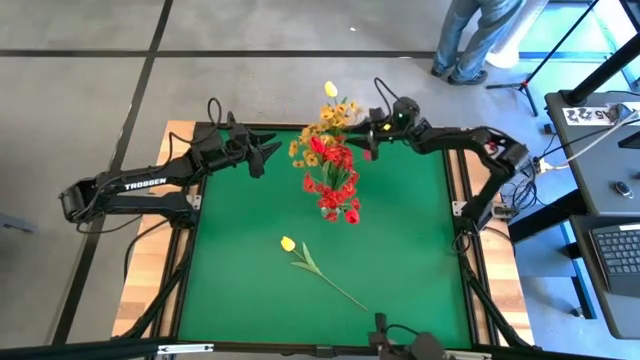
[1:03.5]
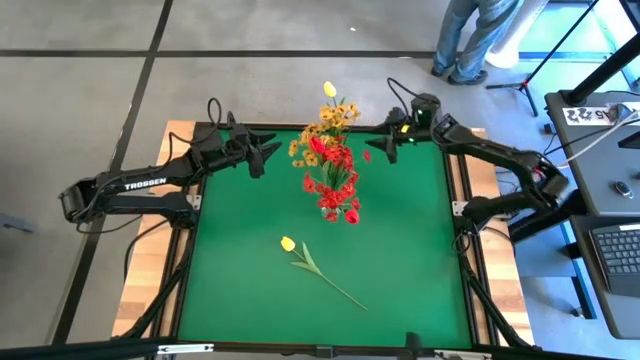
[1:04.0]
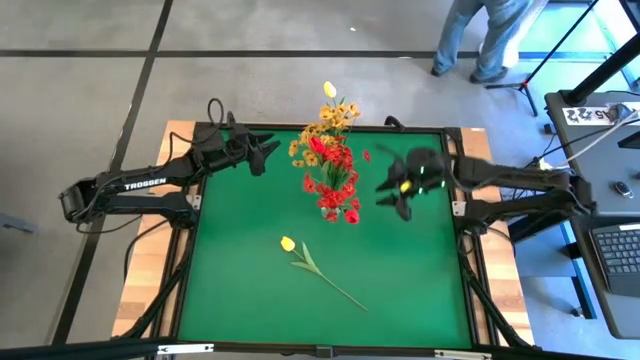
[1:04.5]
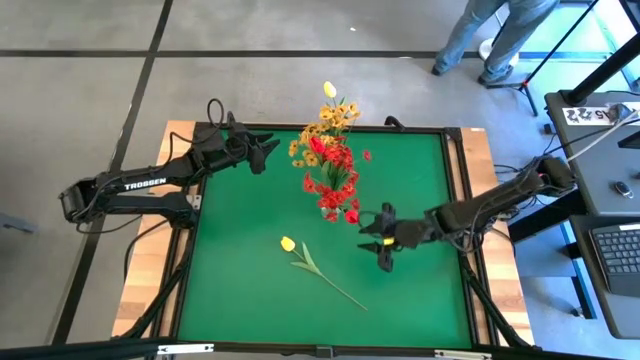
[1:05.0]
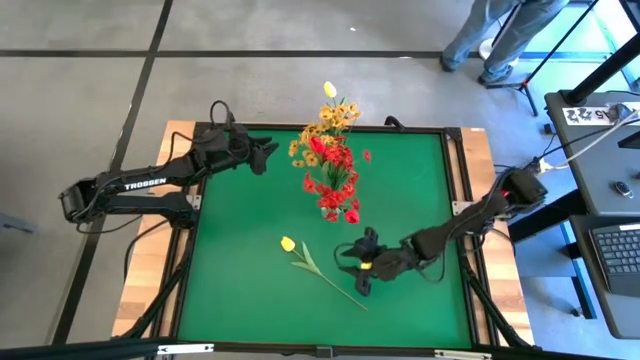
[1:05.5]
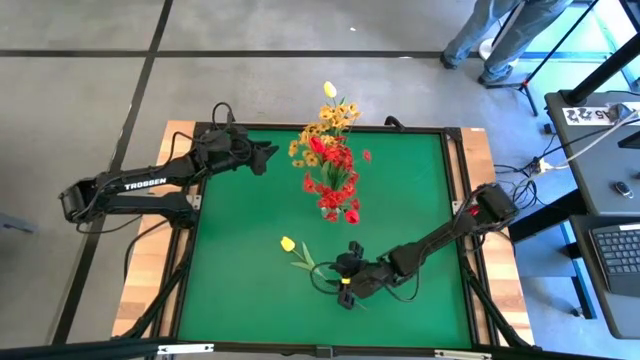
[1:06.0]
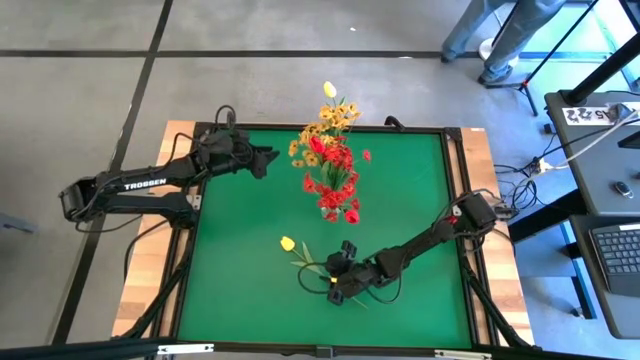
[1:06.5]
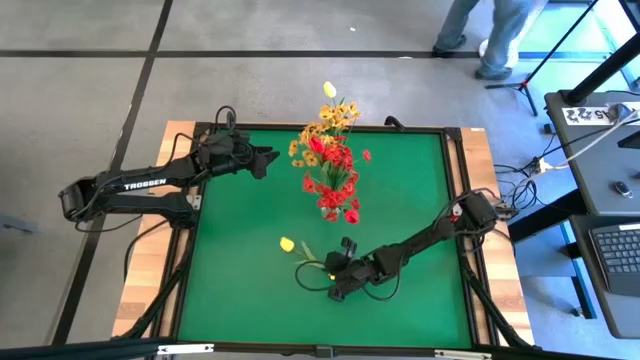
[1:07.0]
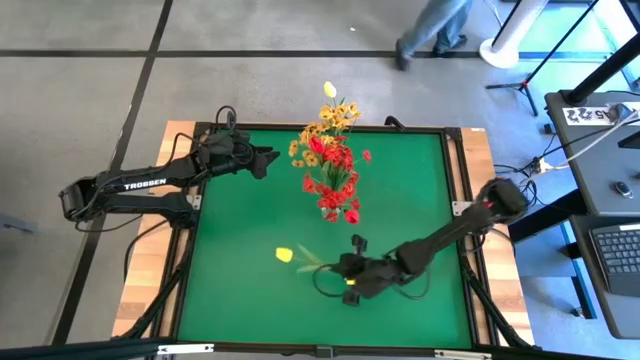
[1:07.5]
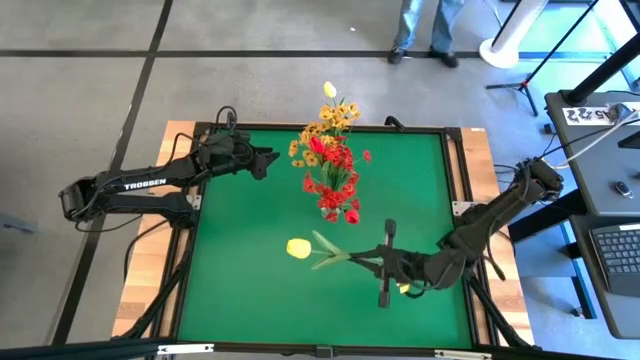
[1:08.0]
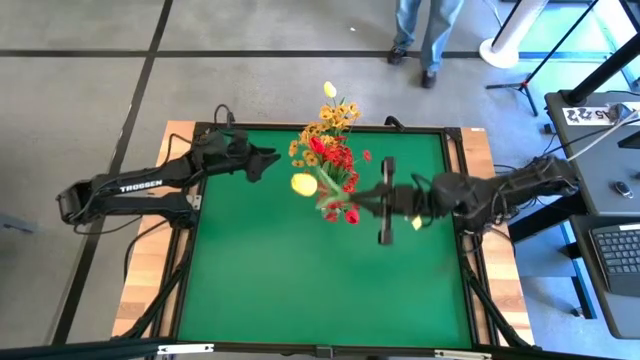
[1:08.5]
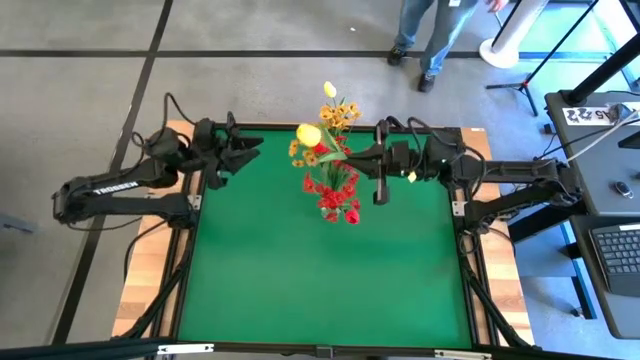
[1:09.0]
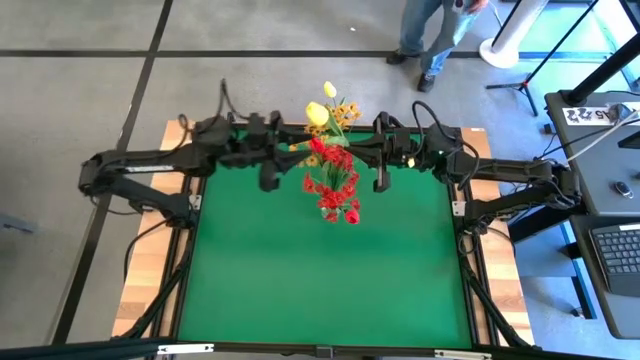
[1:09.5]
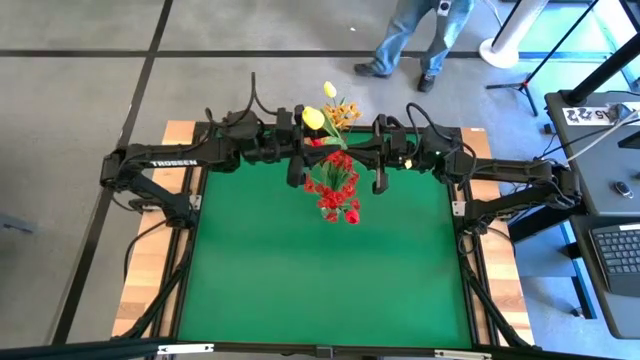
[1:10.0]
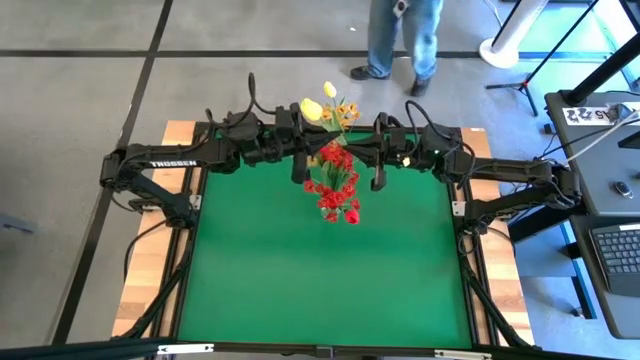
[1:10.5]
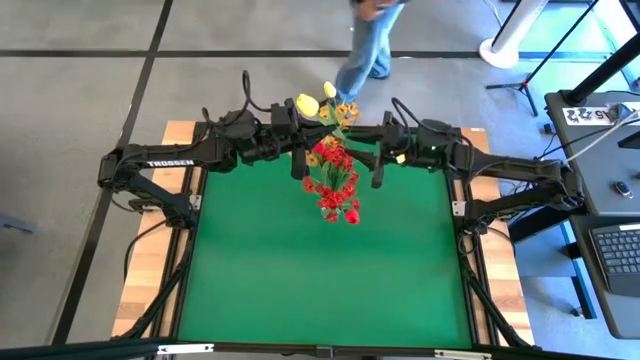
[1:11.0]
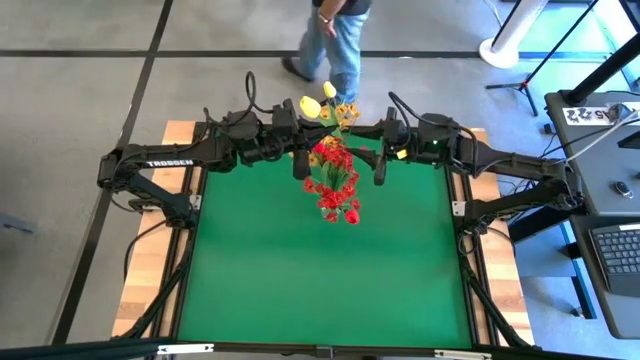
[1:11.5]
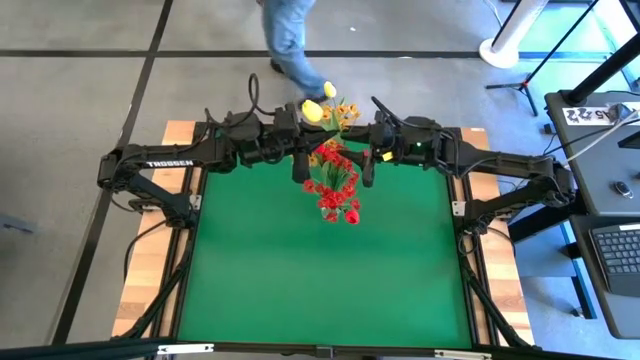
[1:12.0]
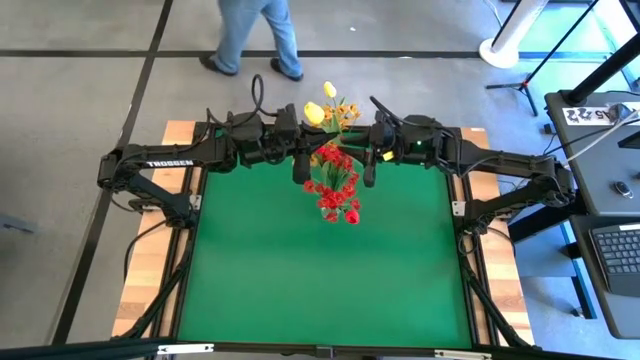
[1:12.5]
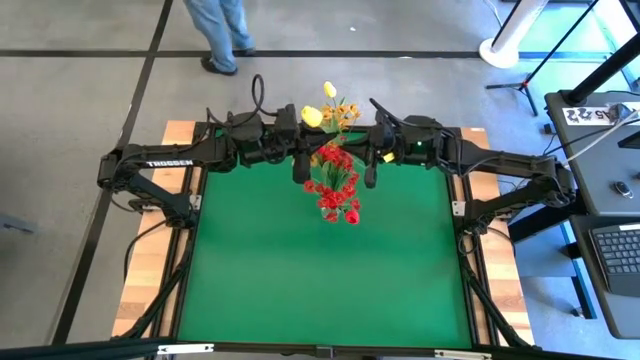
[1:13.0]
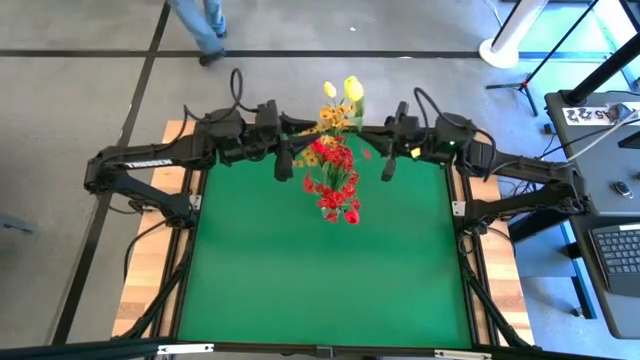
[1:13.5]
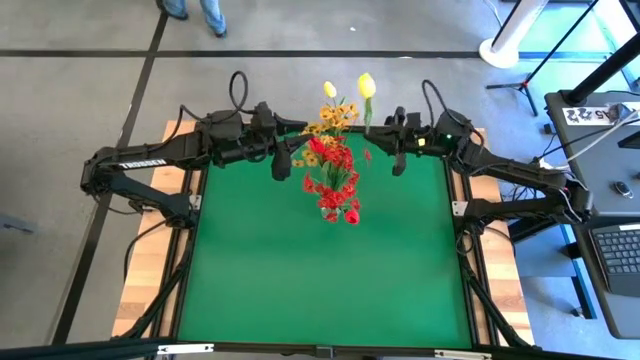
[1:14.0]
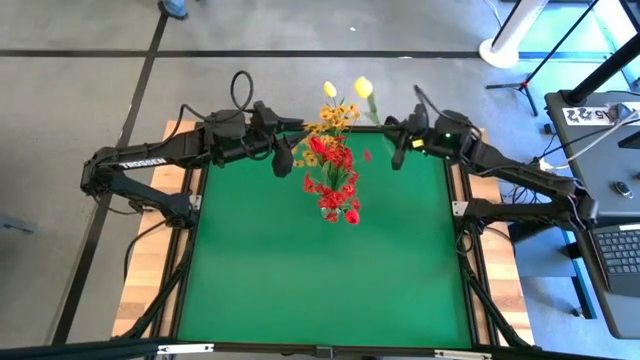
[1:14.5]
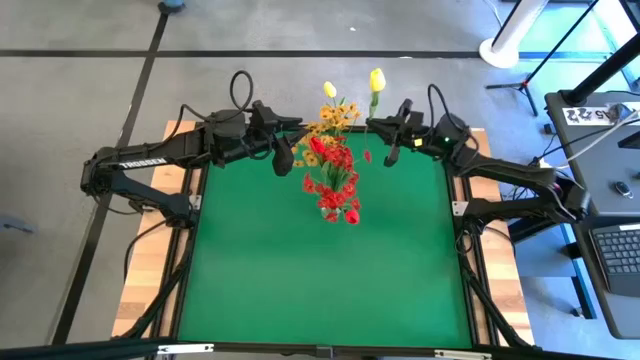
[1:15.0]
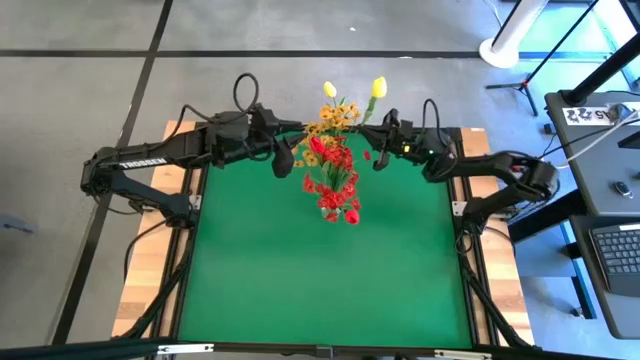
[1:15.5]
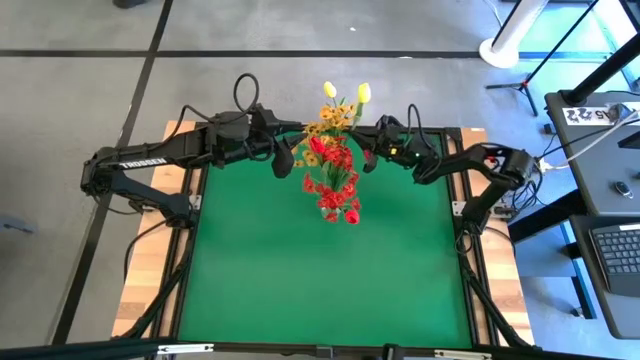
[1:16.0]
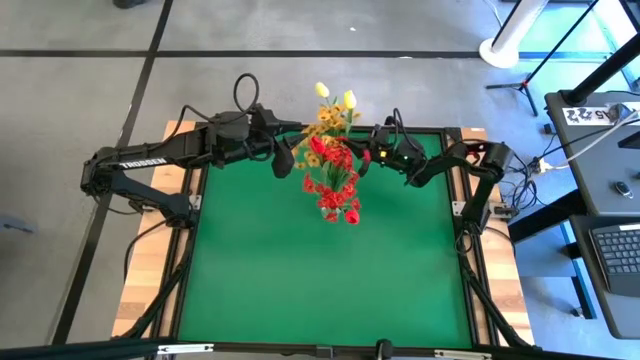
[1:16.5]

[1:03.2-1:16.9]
Task: Sort flowers into vase by color
Put the yellow flower into the red vase

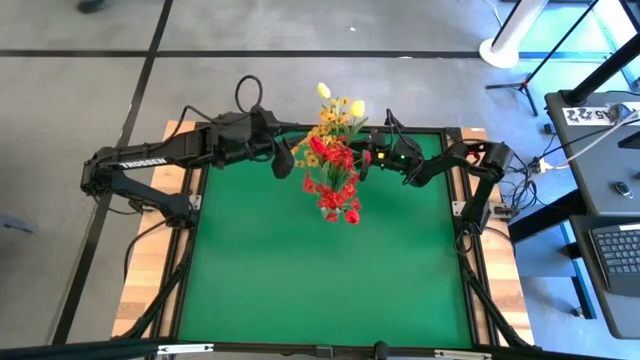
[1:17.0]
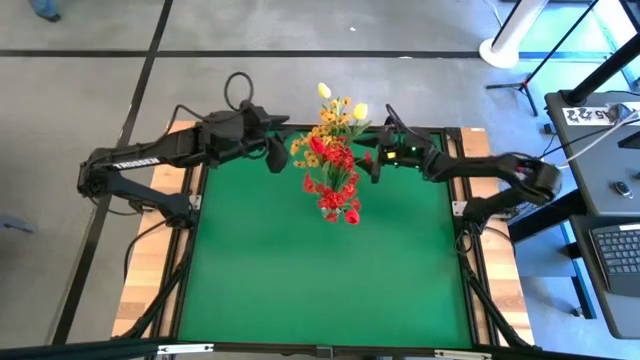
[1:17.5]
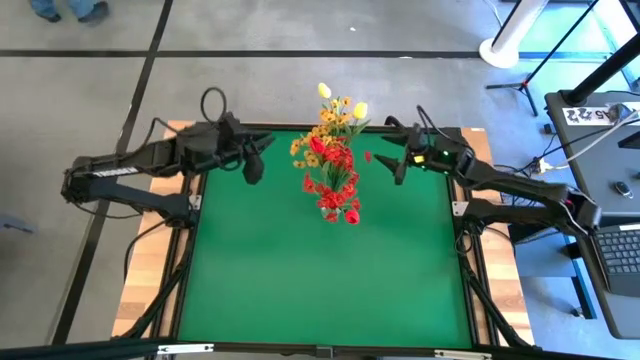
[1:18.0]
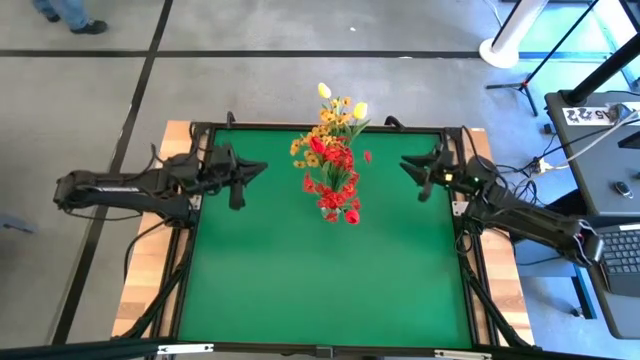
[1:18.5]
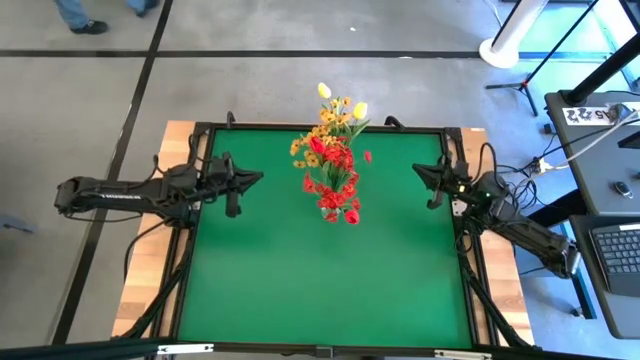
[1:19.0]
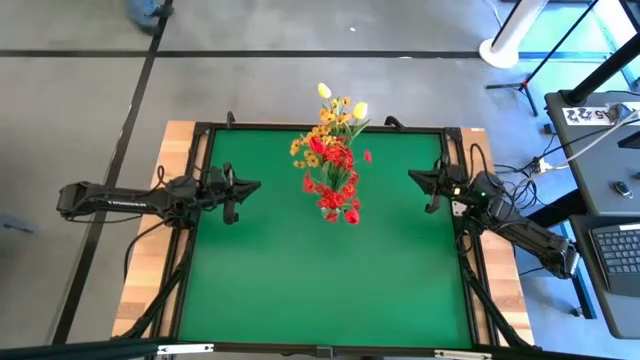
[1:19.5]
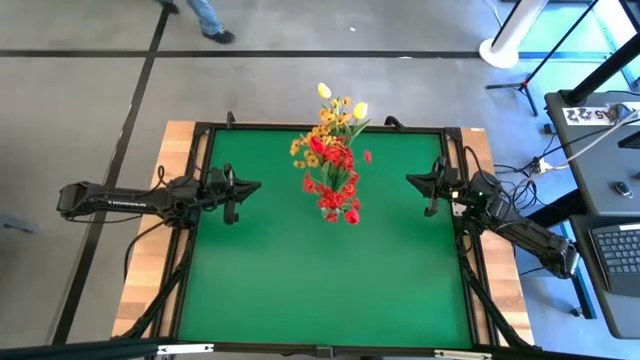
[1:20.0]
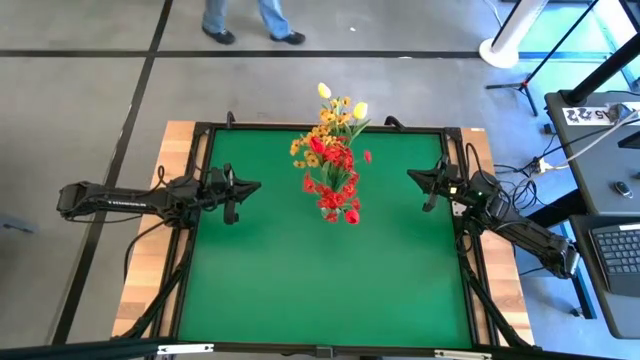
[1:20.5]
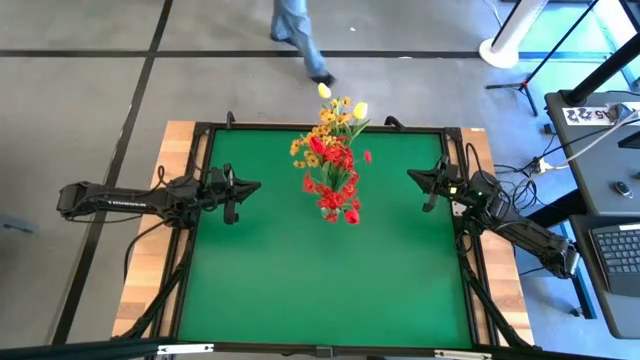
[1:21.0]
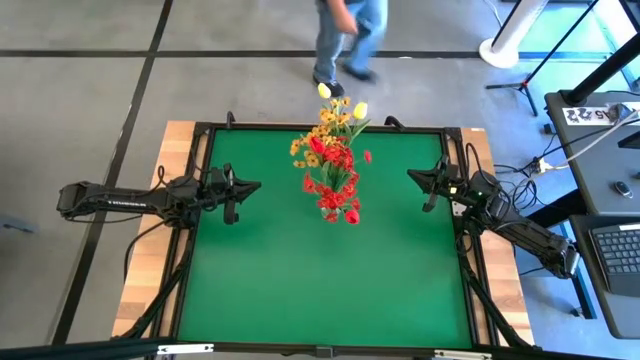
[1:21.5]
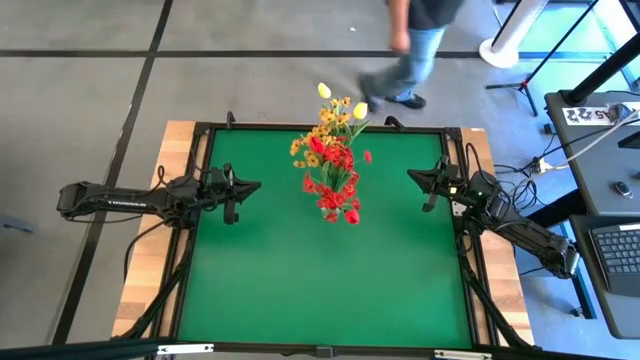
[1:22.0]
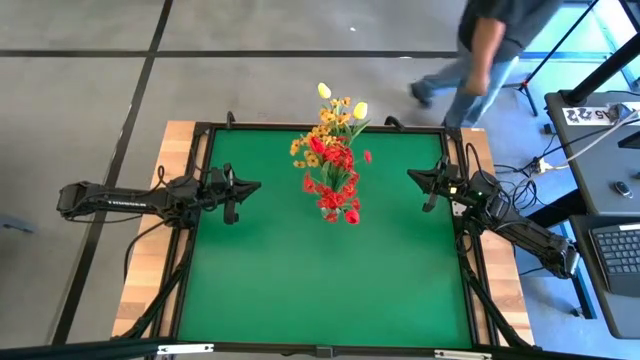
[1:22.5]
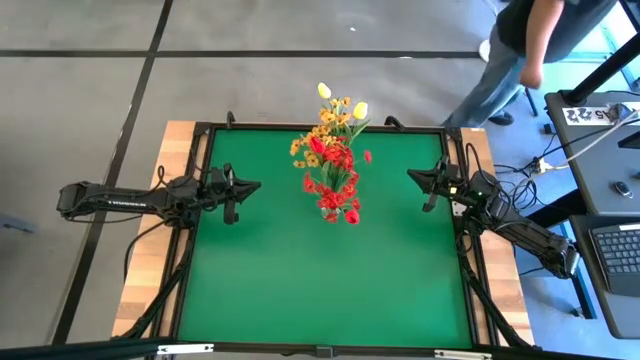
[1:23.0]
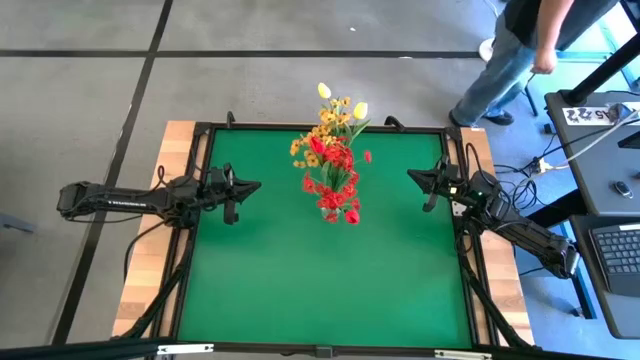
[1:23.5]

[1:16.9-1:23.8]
Return to Home Position

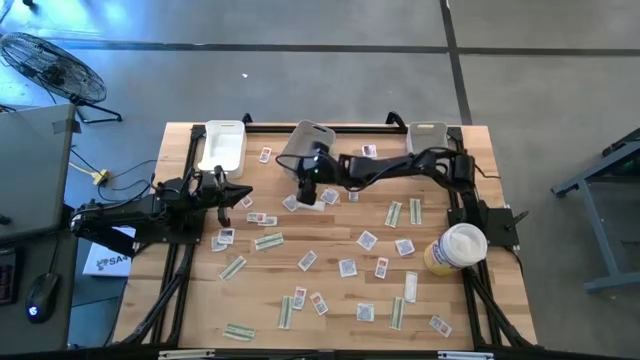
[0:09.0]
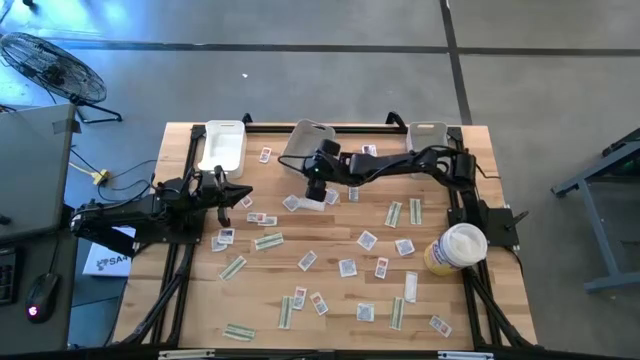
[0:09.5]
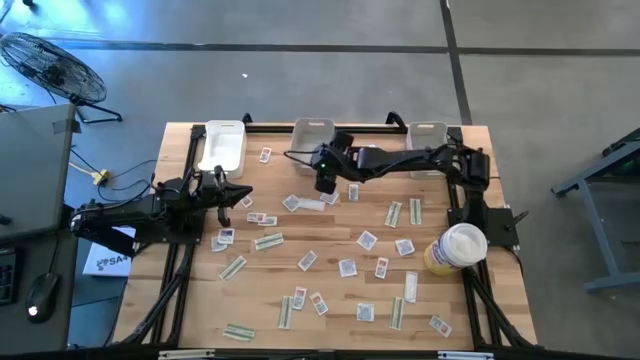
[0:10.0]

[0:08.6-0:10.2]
Task: Pick & Place First Aid Supplies
Adjust the left gray bin on the table
